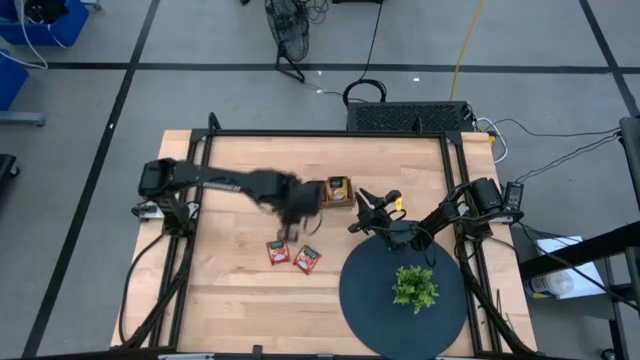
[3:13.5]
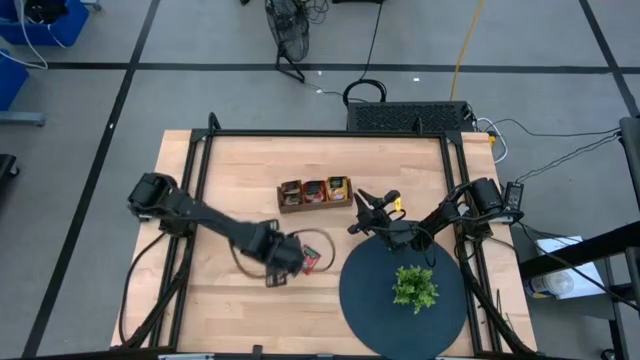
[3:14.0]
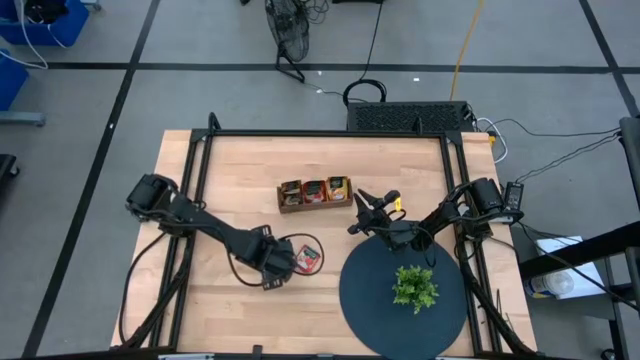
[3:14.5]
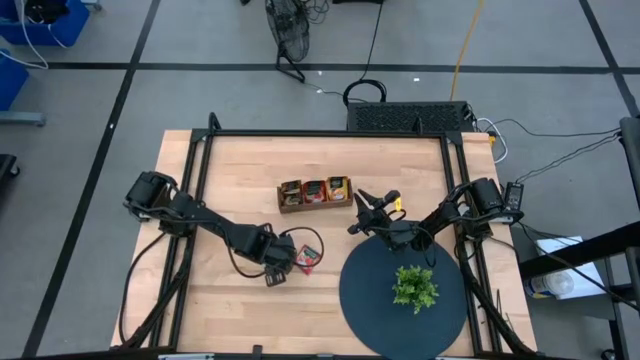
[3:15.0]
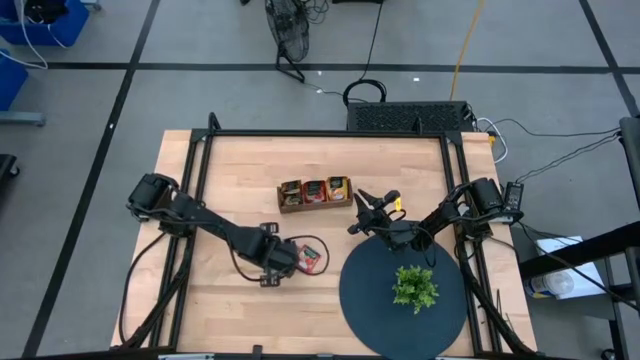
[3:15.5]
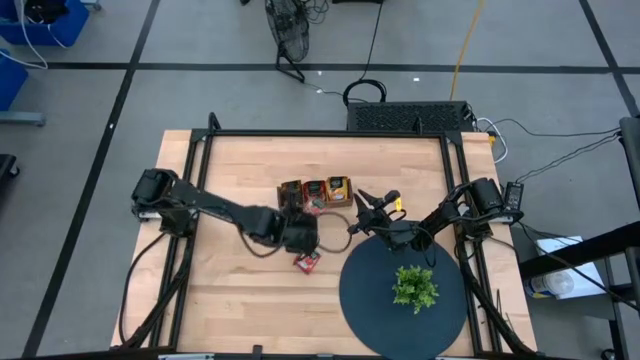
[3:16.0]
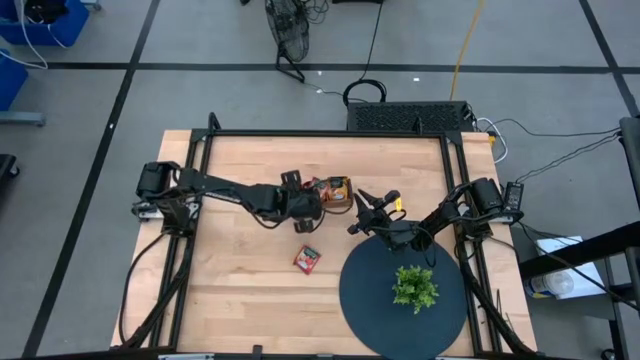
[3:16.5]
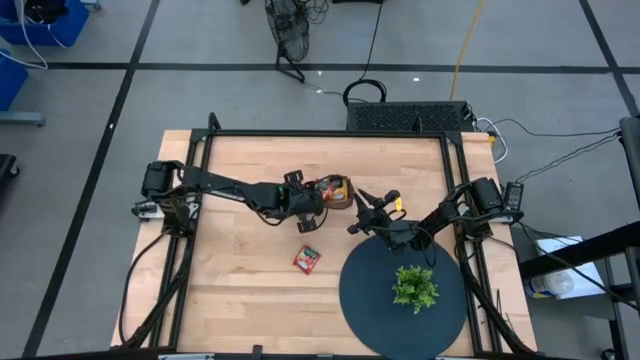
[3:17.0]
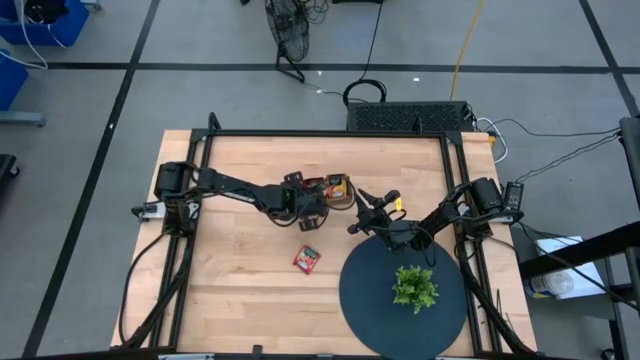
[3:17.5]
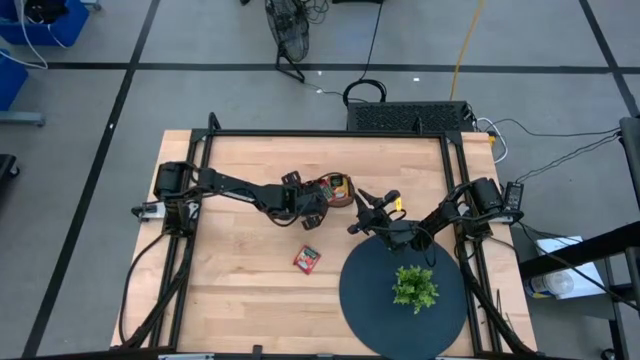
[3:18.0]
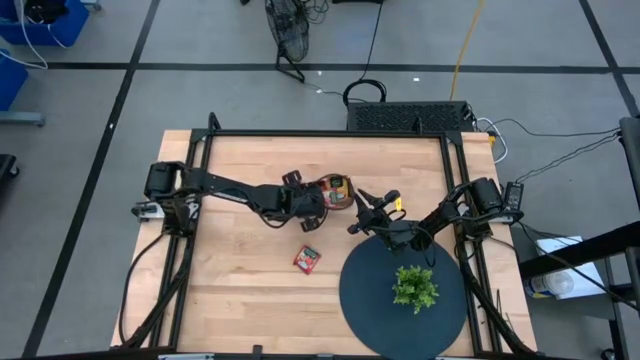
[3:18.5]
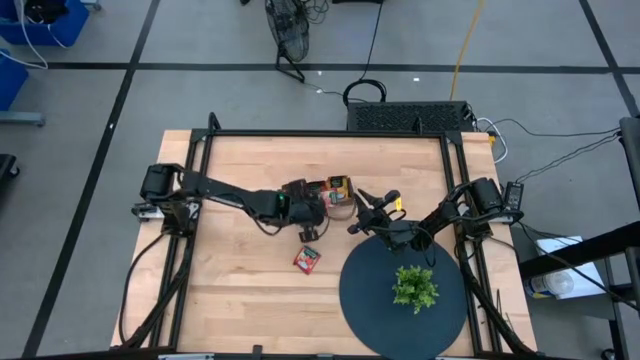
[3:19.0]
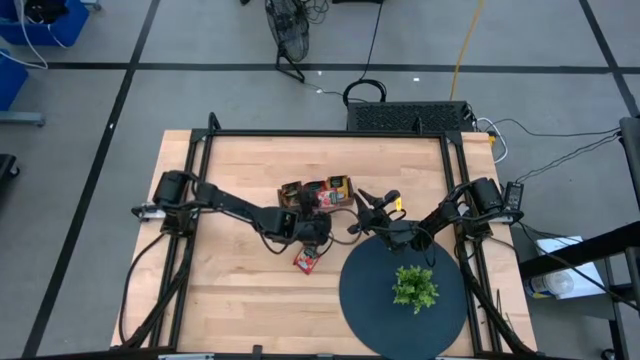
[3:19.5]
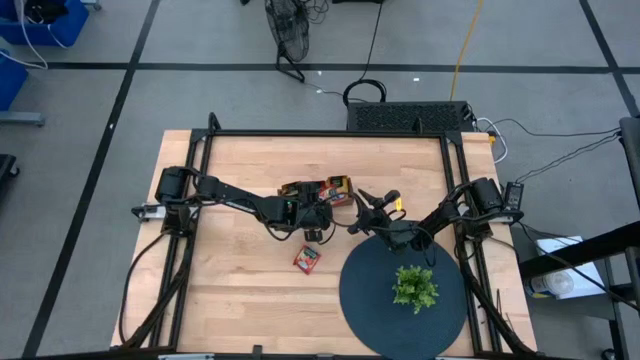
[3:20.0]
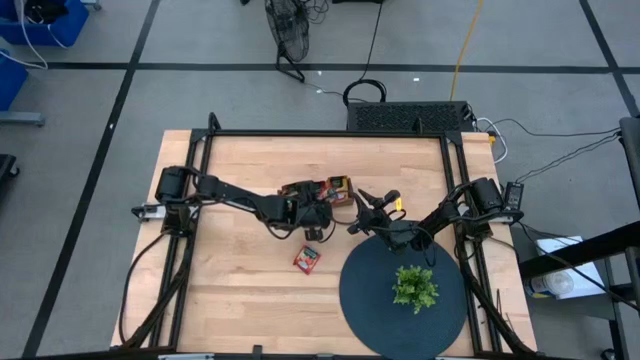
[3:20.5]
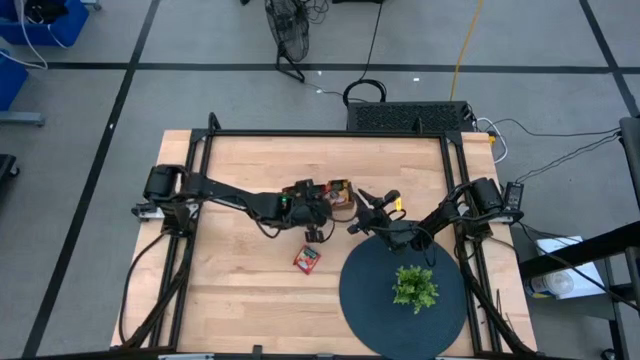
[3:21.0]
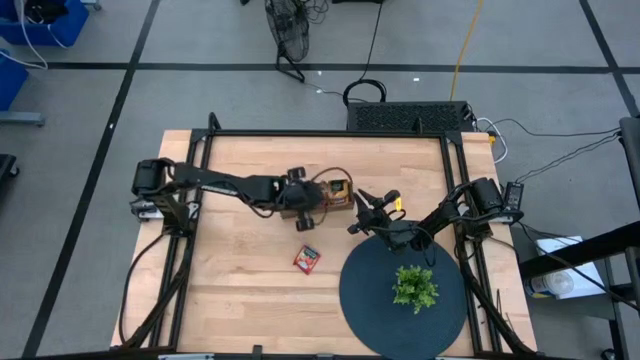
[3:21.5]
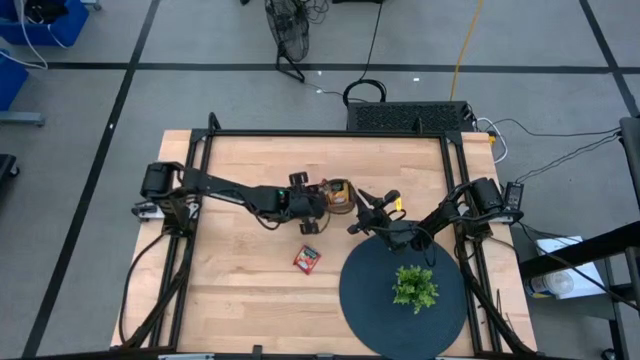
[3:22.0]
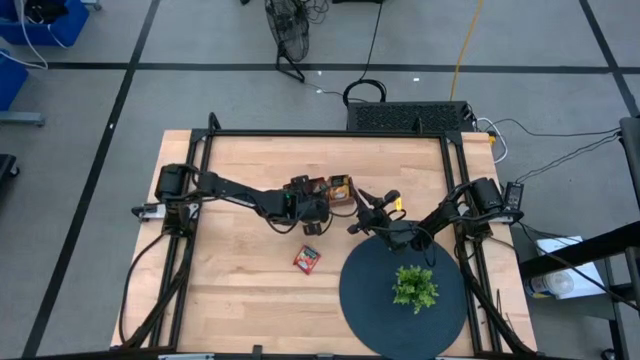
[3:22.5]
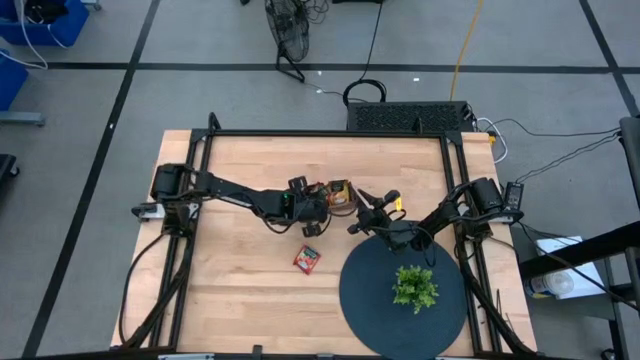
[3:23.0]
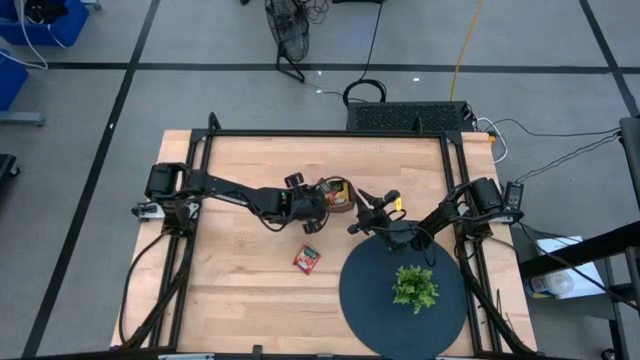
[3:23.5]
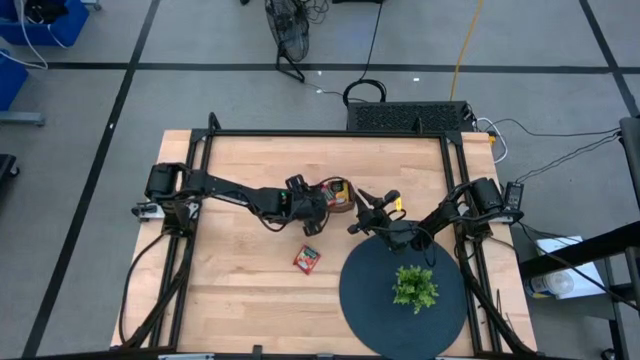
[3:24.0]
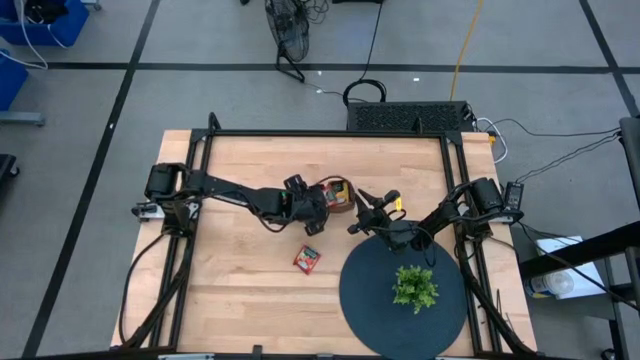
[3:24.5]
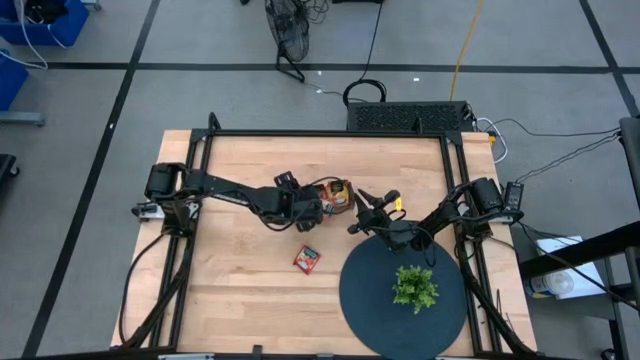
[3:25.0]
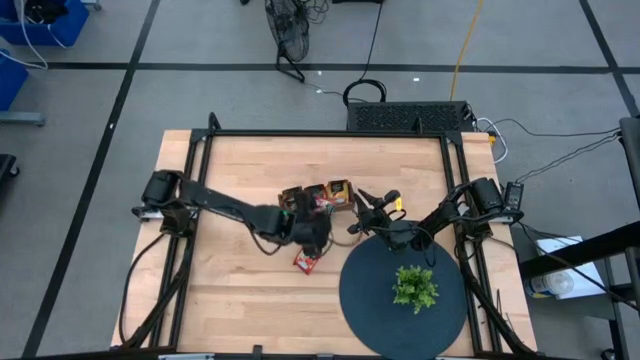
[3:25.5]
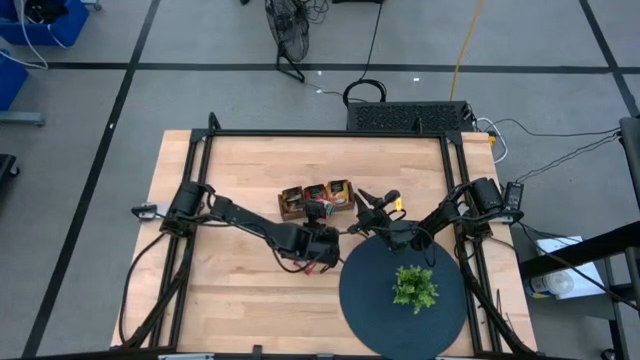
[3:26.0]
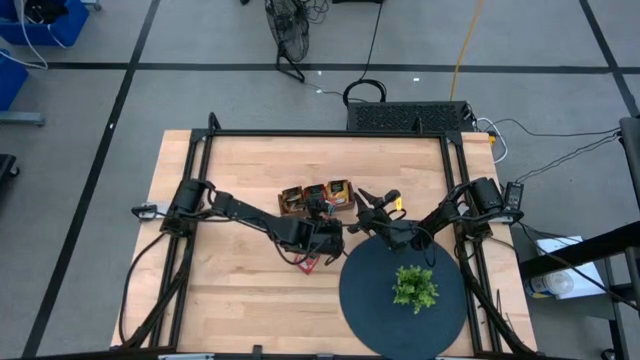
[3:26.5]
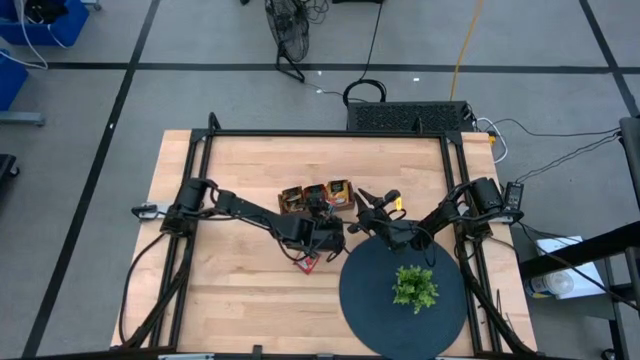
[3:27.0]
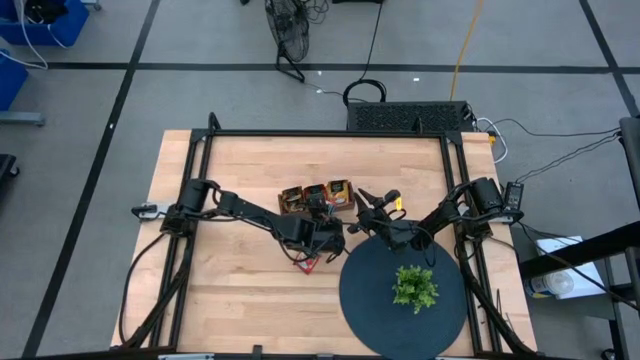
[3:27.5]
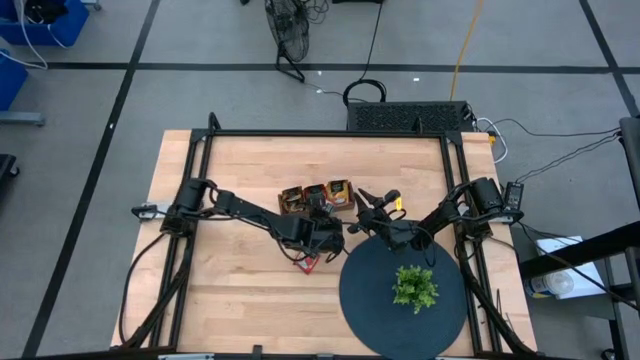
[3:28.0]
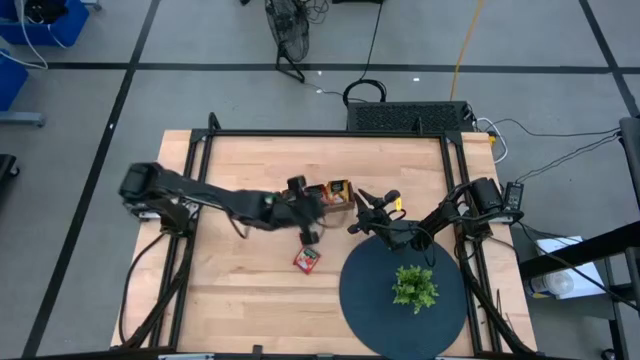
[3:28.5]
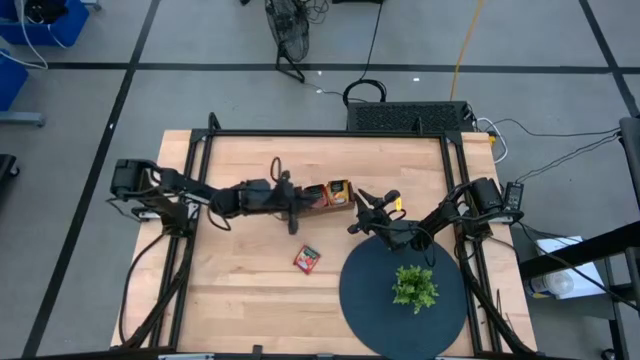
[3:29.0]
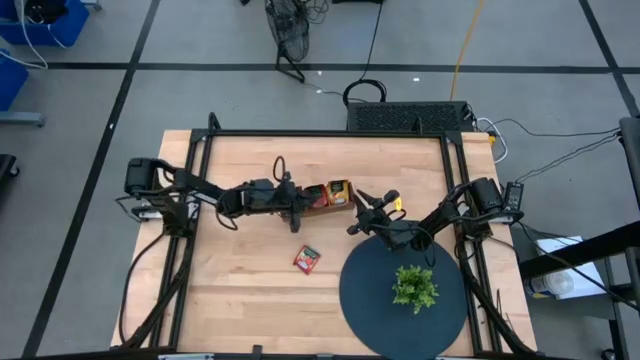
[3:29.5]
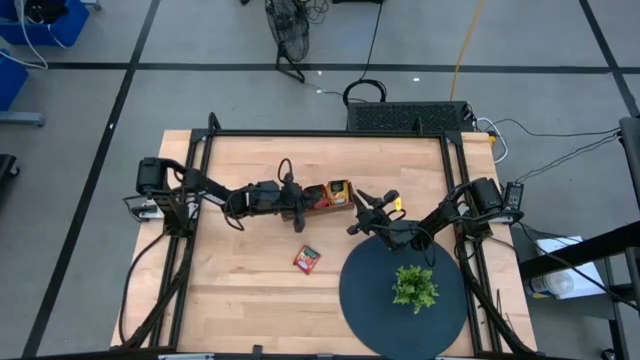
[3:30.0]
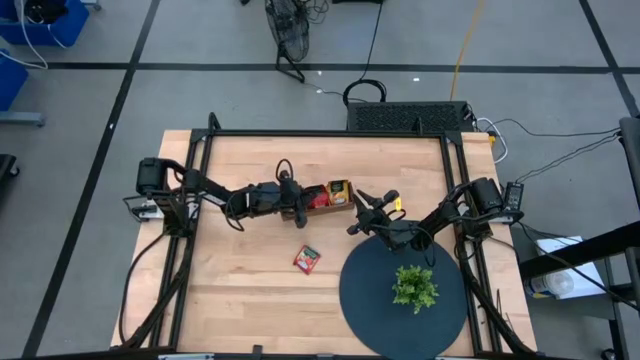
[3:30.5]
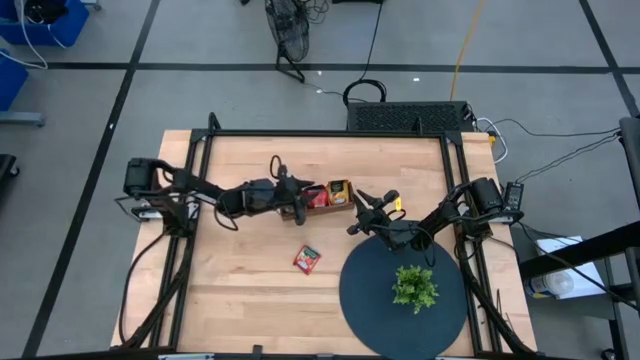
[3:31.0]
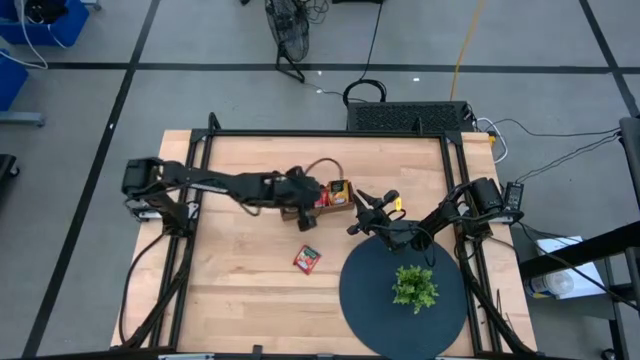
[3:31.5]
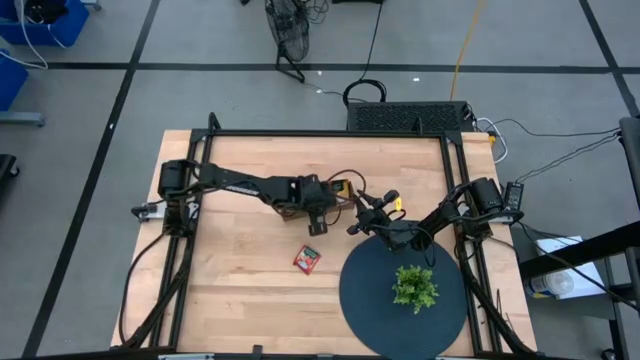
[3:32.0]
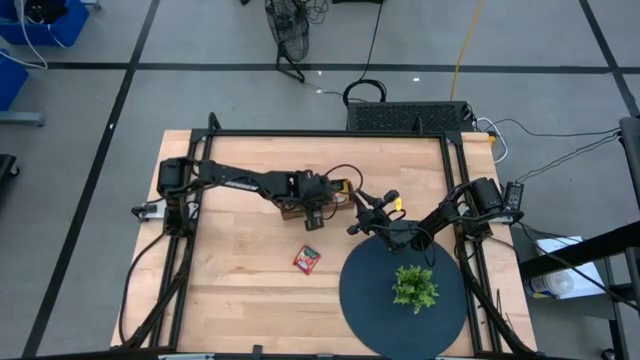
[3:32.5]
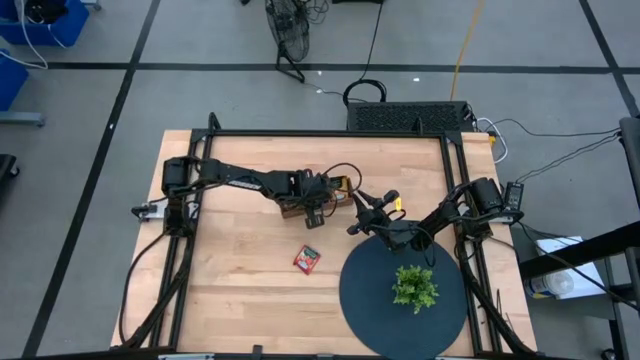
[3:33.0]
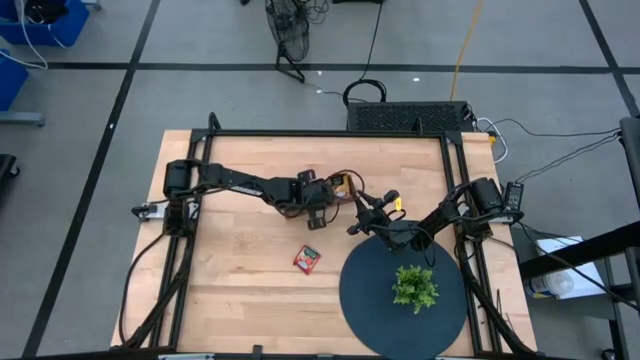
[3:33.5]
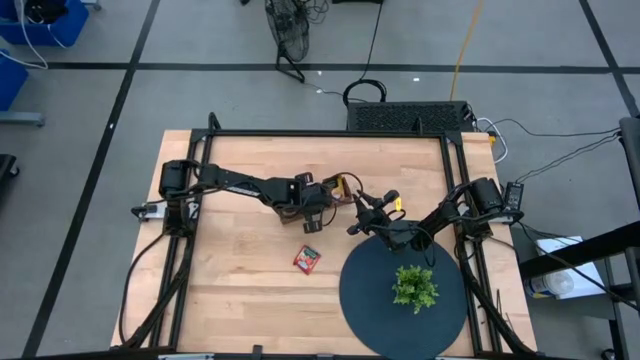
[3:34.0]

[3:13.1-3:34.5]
Task: Pick & Place Tea
Put the red tea bag into the middle section wooden organizer
